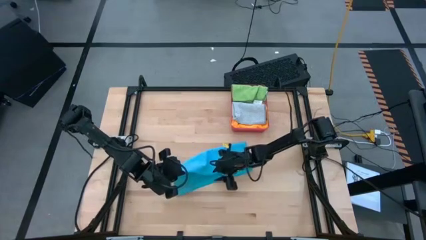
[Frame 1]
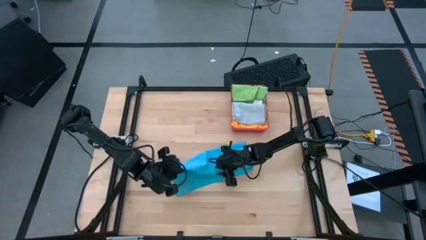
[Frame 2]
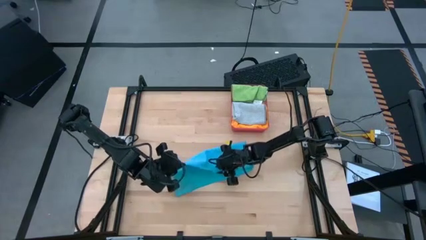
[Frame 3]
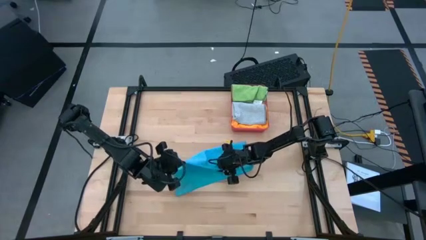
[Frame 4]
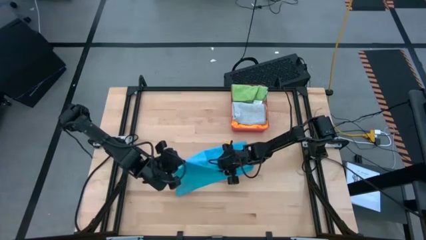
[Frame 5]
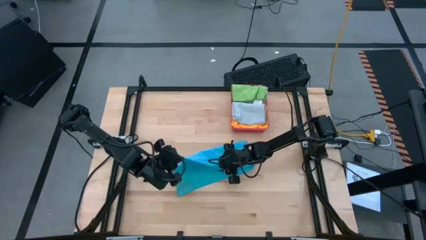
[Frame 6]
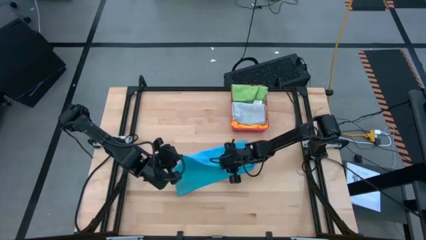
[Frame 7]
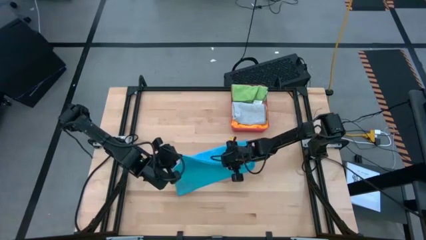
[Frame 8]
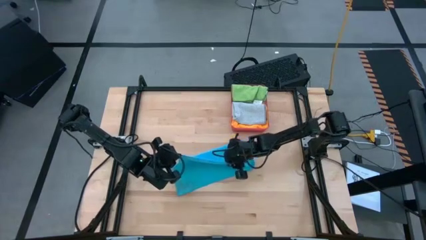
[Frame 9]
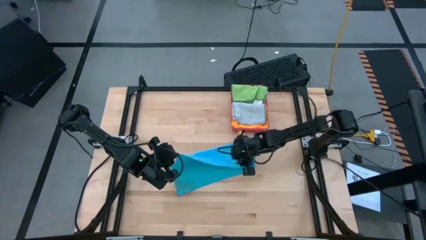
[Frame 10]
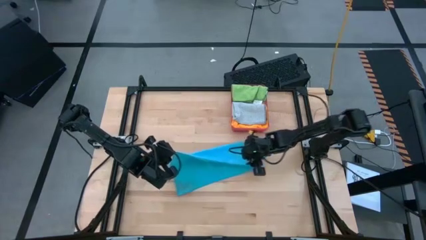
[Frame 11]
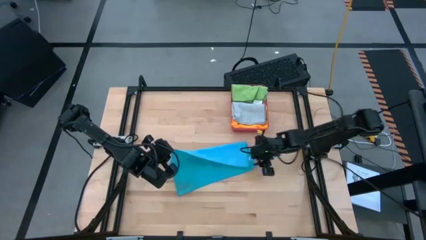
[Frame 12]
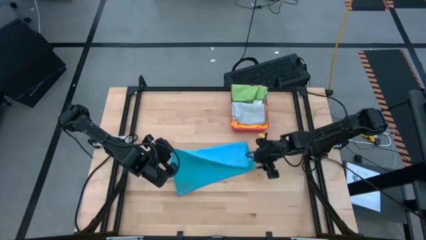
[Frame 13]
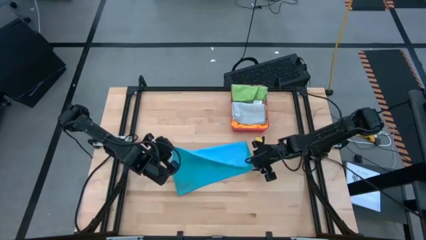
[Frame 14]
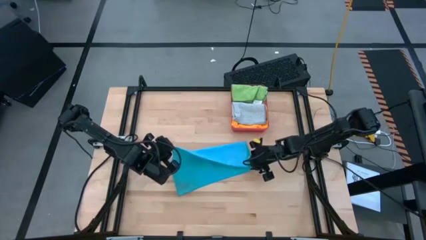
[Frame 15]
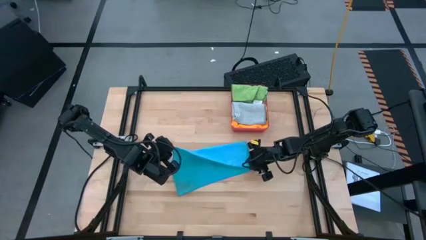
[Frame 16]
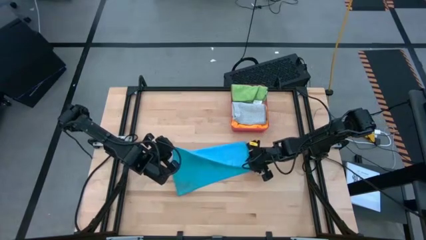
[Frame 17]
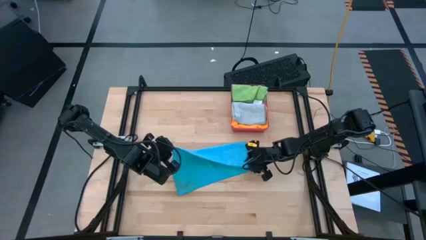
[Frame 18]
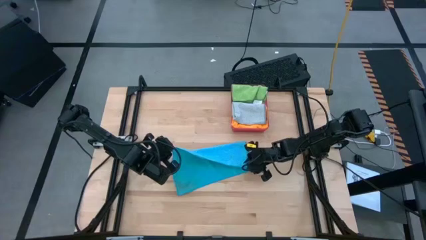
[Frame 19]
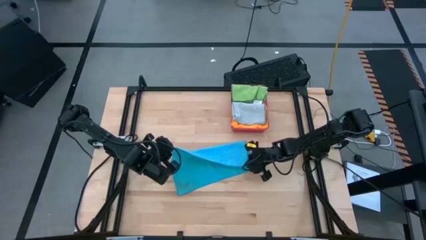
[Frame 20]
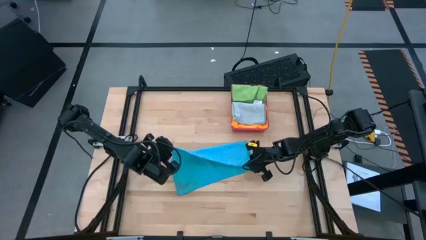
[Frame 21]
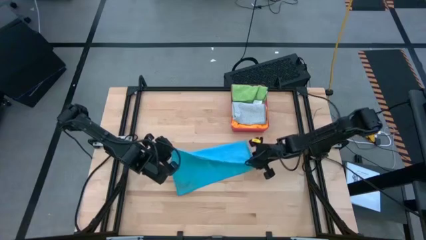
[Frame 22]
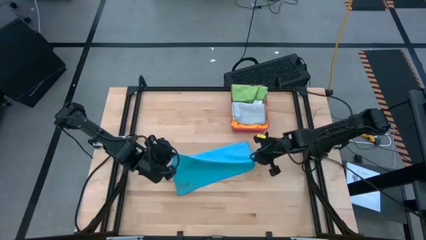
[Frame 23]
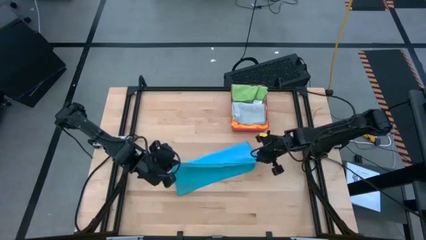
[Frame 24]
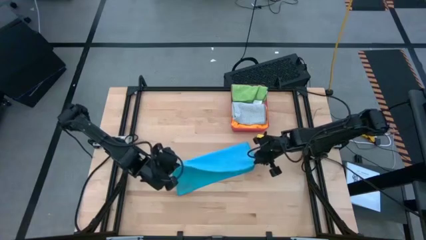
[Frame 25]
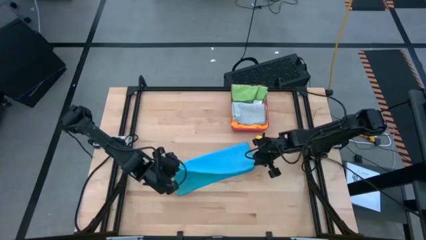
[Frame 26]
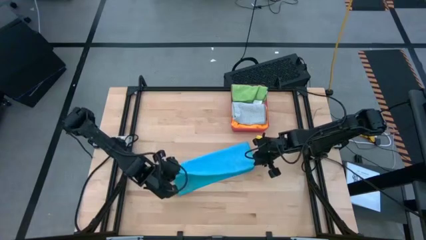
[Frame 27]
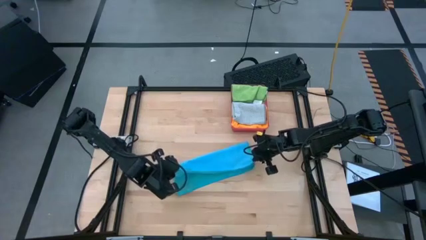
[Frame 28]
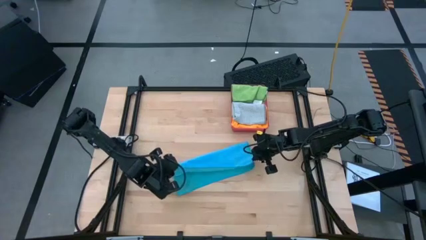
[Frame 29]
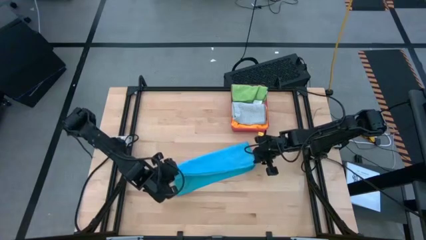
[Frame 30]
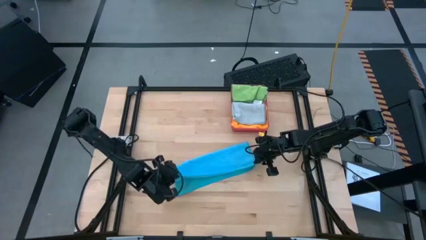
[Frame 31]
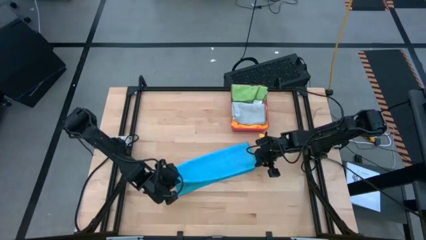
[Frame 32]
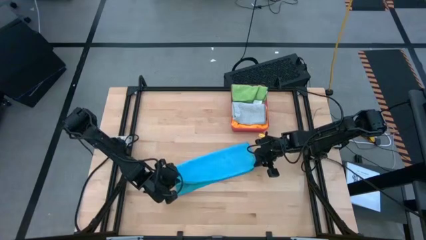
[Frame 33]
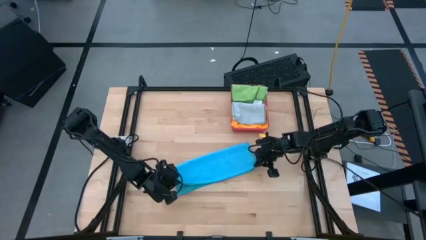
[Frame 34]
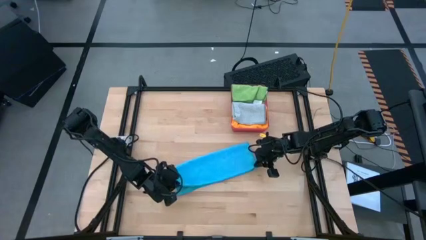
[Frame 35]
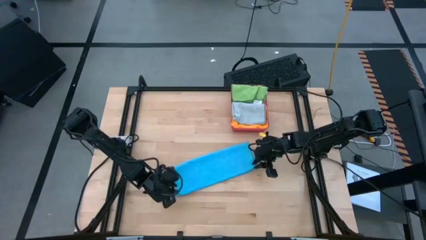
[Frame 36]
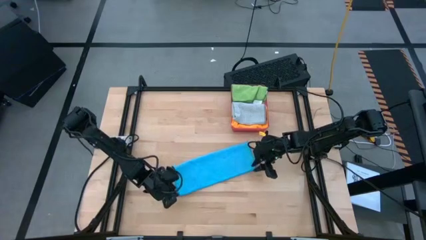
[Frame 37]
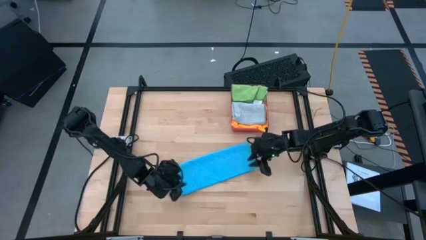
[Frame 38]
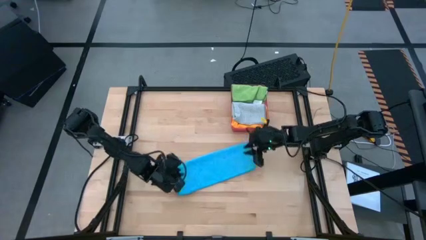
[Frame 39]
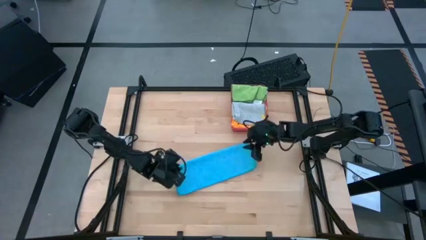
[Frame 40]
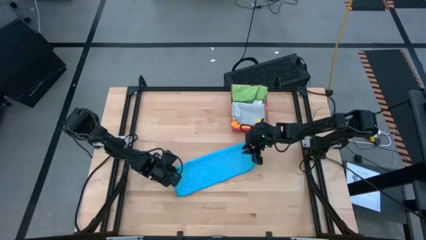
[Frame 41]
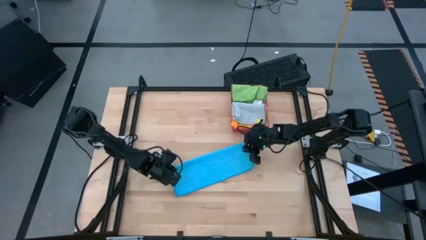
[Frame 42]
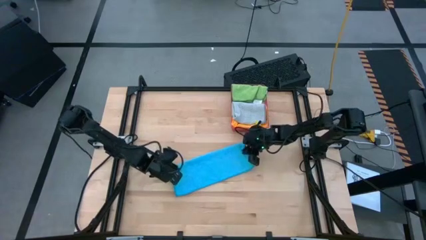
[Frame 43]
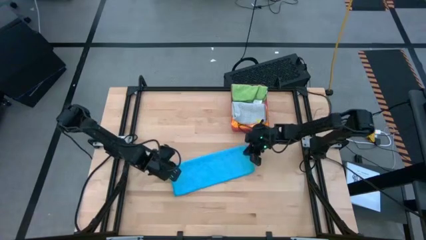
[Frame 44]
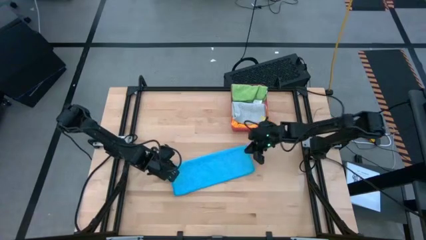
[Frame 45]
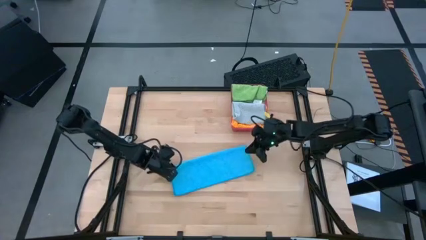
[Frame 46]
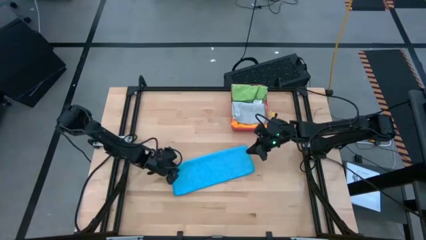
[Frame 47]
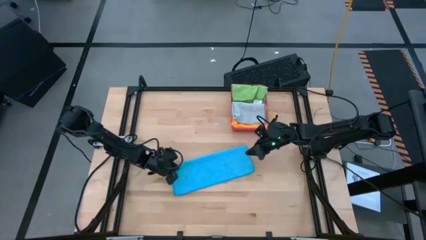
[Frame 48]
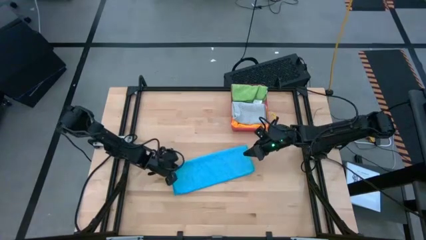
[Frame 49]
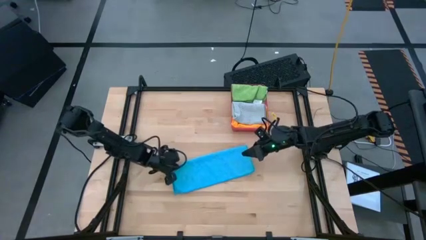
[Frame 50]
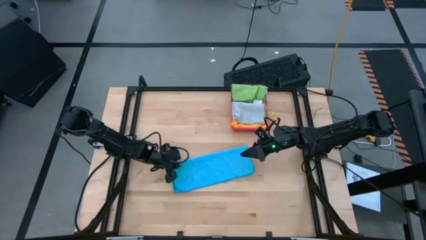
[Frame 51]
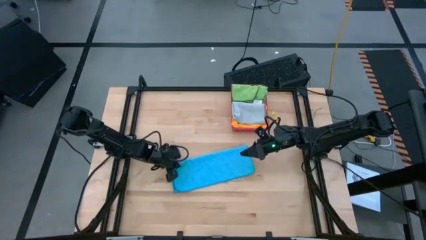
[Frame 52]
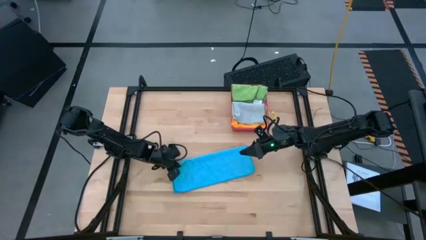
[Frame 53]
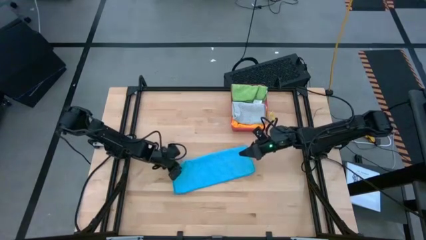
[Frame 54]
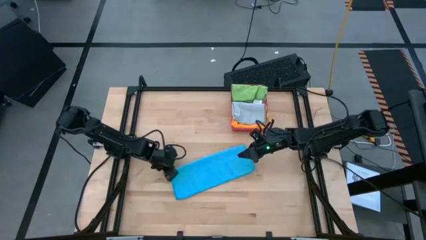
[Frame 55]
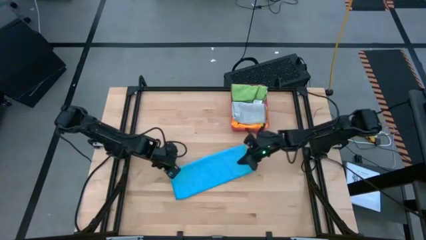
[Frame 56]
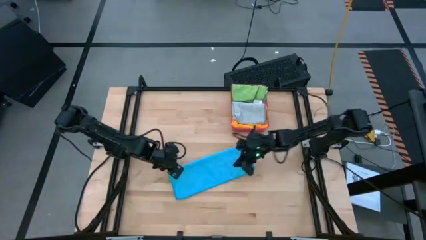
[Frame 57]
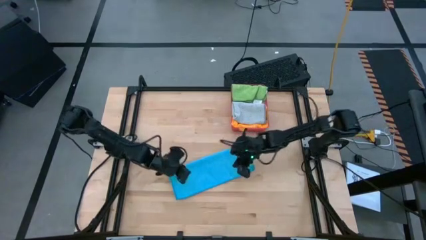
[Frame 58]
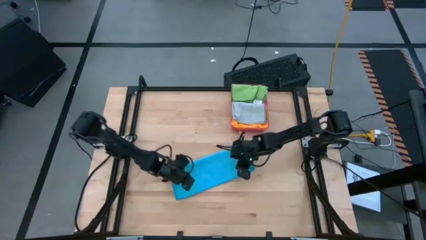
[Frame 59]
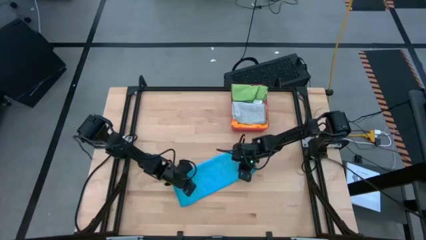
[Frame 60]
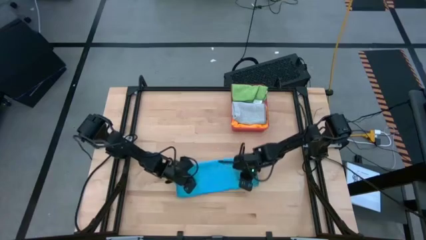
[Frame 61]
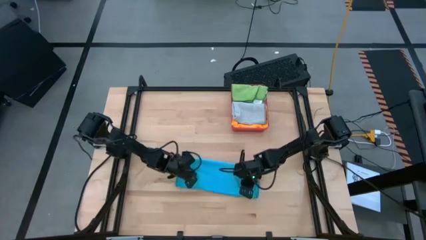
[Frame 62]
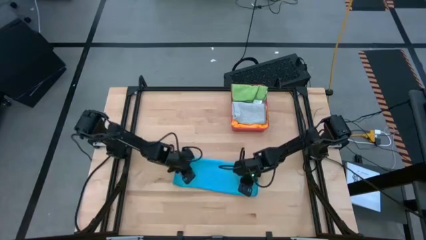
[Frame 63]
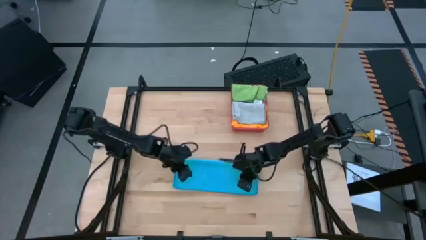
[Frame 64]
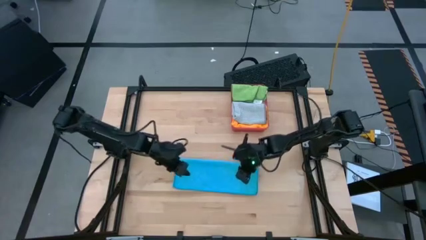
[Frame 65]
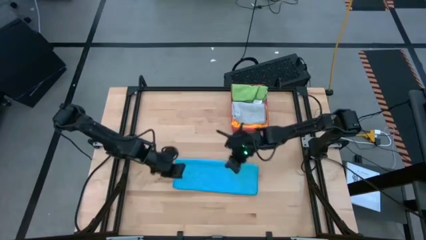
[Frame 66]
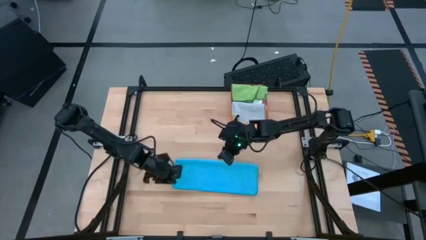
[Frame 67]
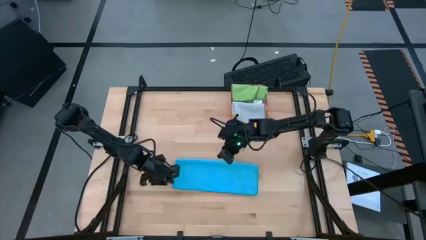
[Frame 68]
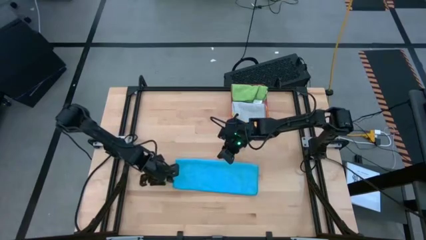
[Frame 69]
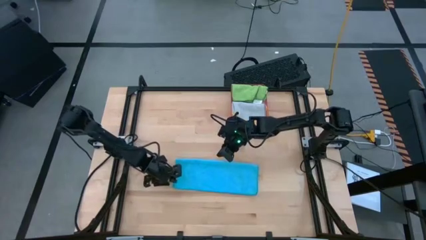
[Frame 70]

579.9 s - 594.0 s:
Task: Fold microfiber towels
Fold the blue microfiber cloth

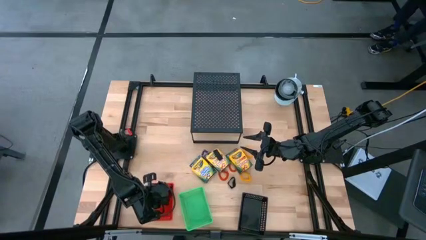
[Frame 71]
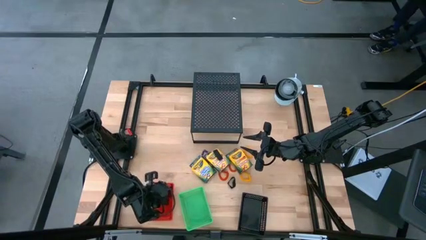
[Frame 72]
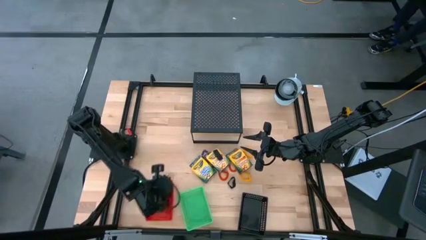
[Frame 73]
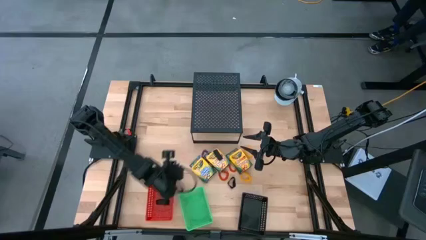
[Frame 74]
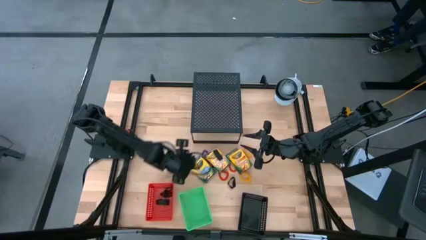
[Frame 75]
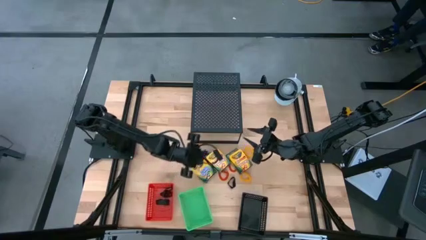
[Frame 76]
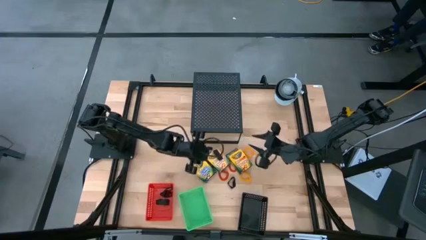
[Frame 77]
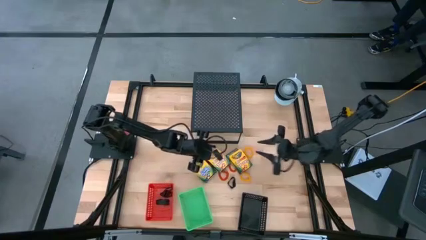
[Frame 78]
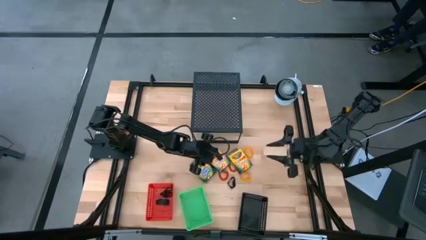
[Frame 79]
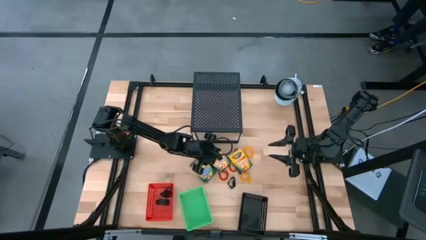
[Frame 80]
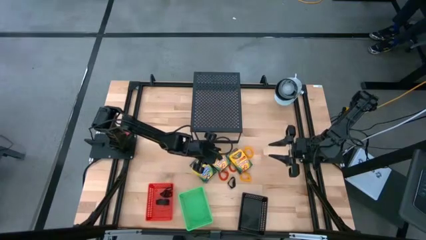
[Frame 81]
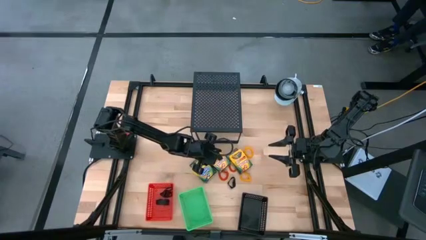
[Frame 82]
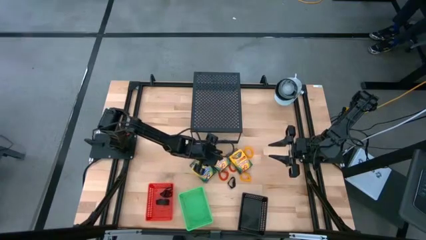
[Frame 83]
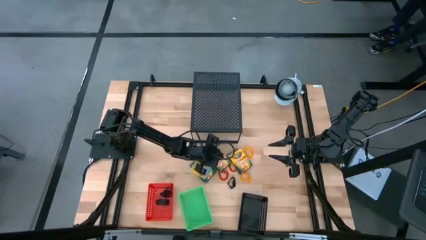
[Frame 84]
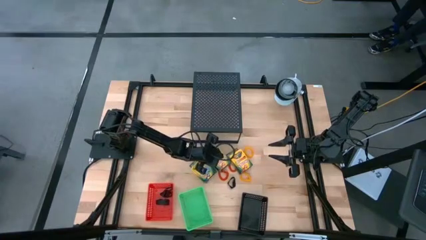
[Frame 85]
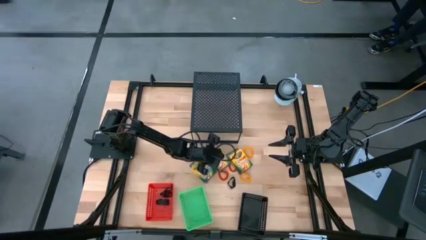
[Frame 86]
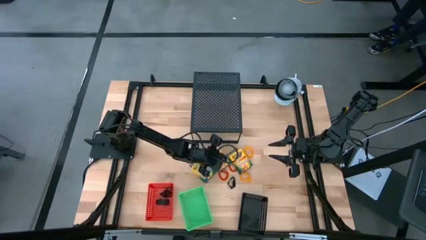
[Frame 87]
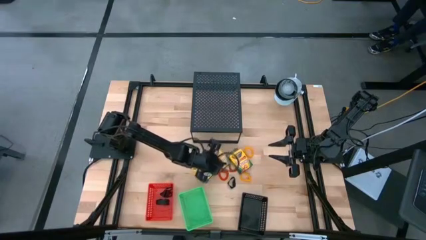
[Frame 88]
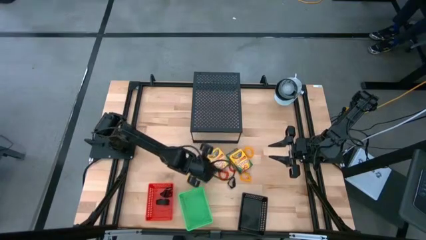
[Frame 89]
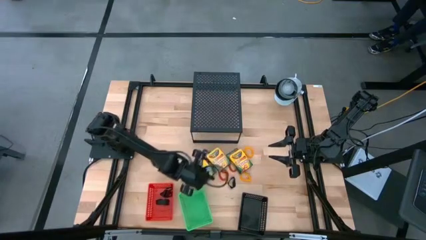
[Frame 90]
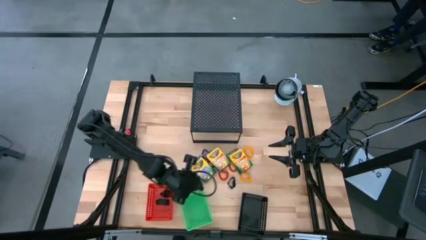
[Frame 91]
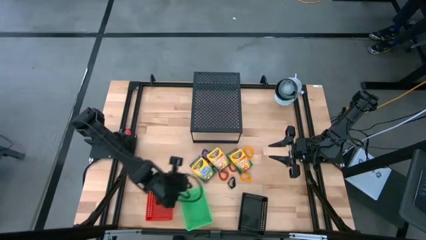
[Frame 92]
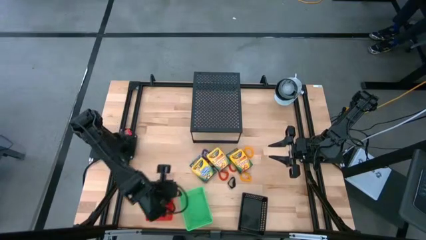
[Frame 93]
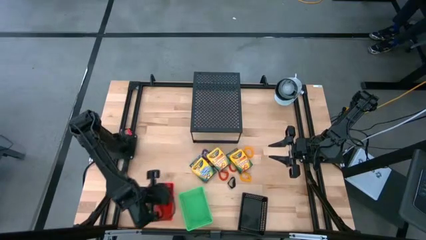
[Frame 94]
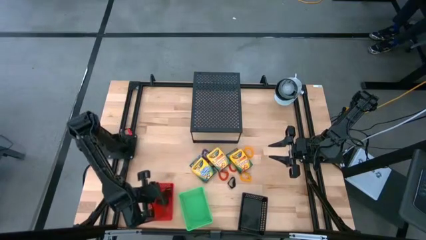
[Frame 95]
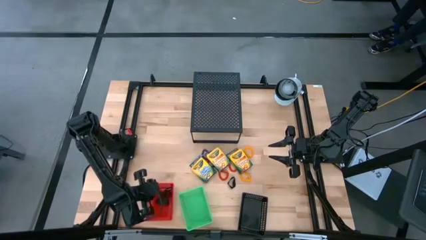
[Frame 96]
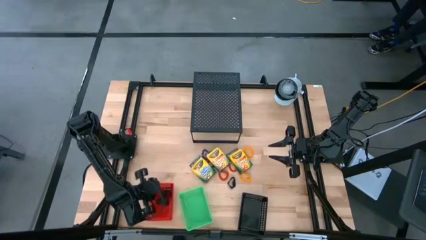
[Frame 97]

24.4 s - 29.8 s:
Task: Pick & Place Office Desk Supplies
Put the black rubberband into the red bin
